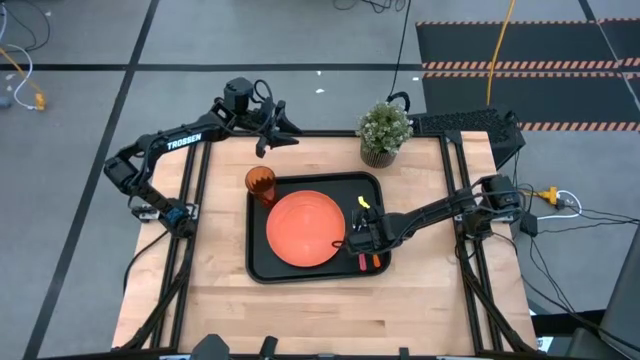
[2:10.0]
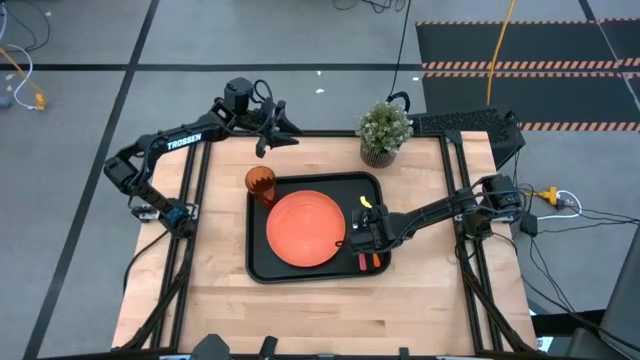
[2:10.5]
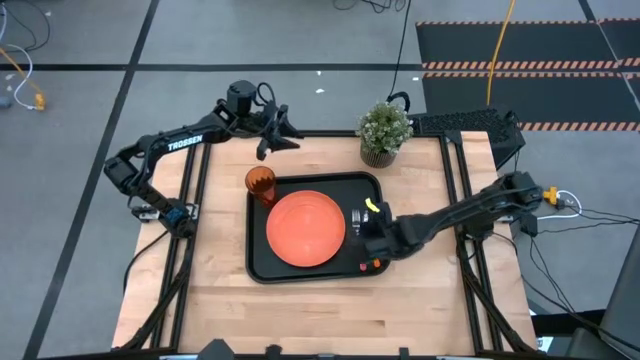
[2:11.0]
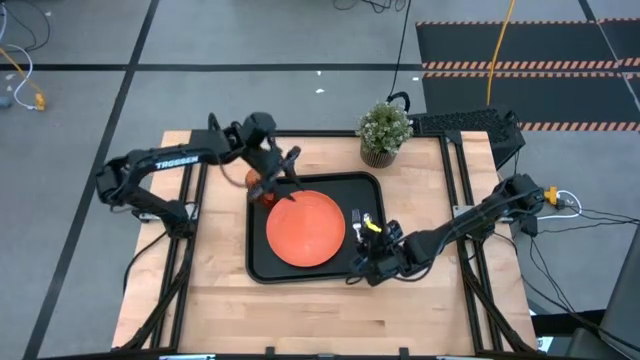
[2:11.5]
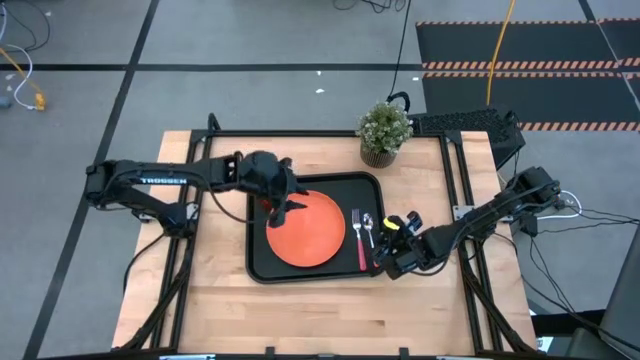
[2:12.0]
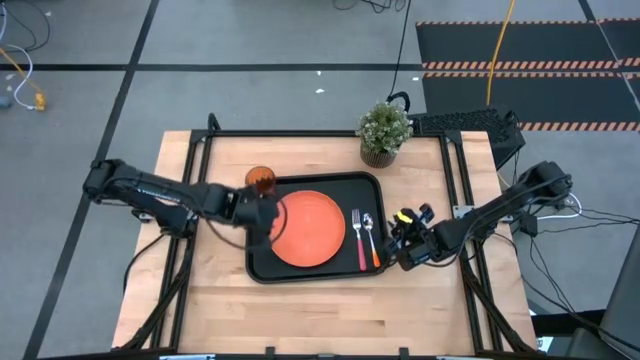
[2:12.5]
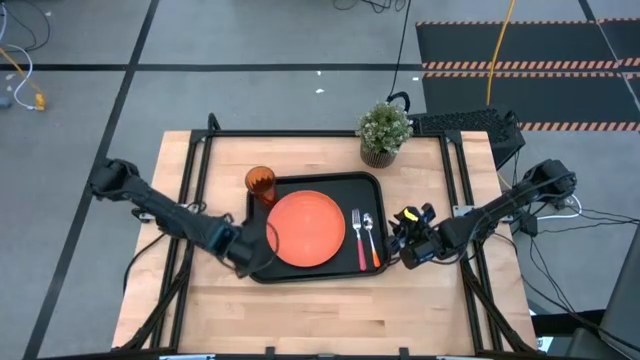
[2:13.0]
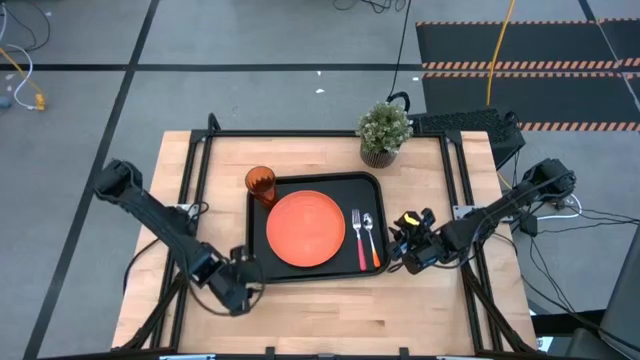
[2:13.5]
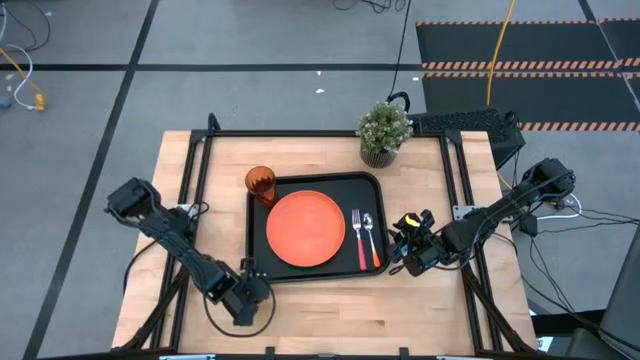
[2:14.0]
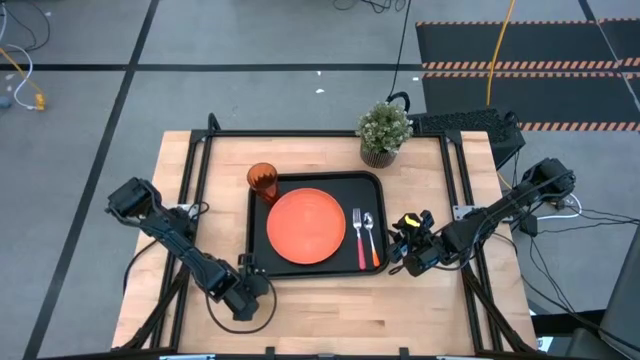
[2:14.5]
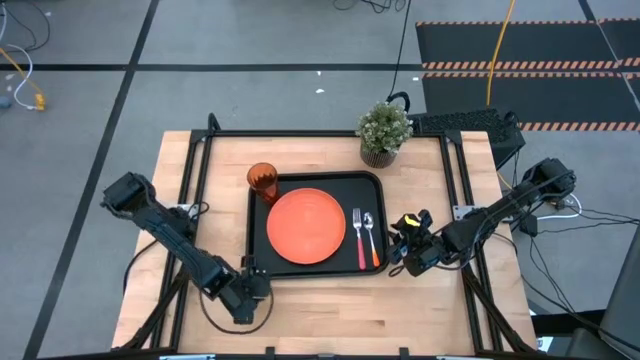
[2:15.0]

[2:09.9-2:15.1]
Task: Pick and place plate/cup/fork/spoon on tray
Adjust the black serving tray

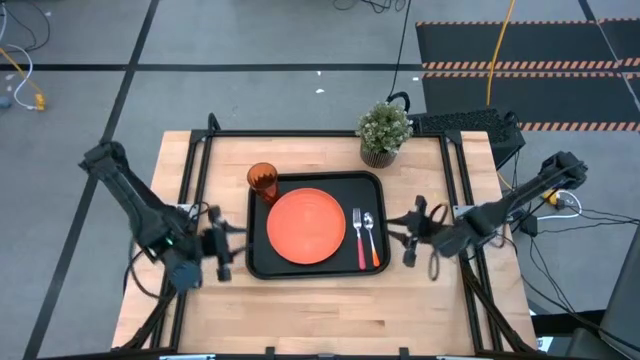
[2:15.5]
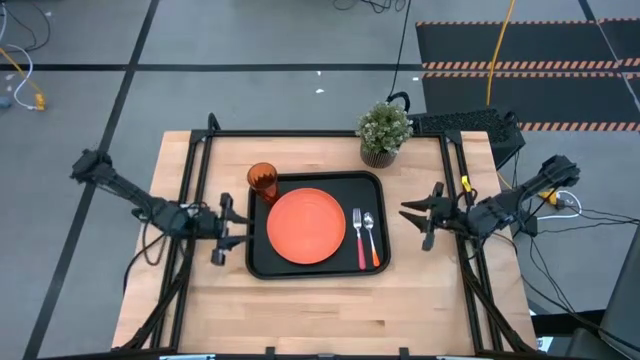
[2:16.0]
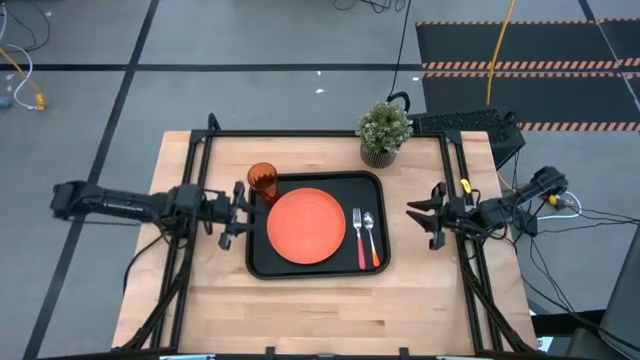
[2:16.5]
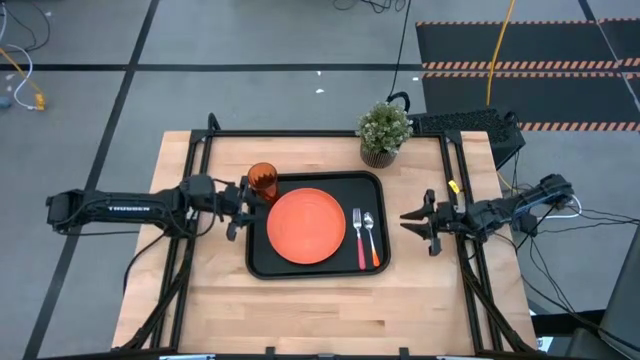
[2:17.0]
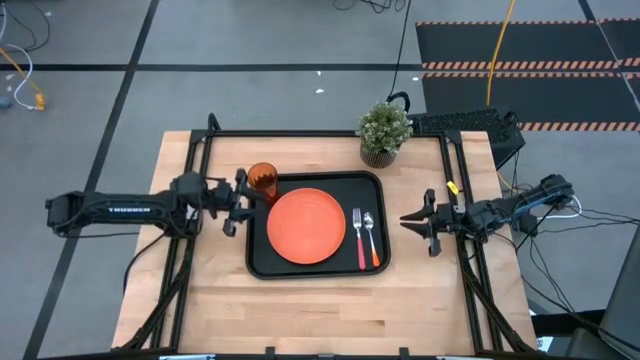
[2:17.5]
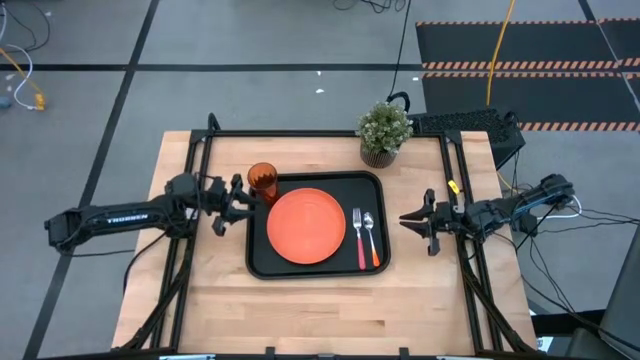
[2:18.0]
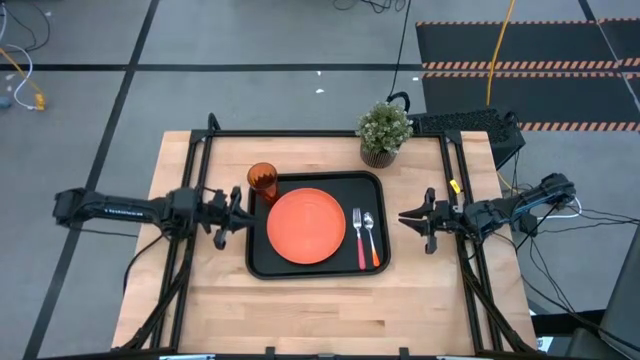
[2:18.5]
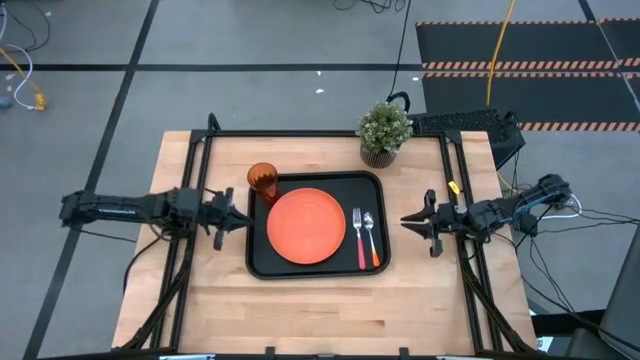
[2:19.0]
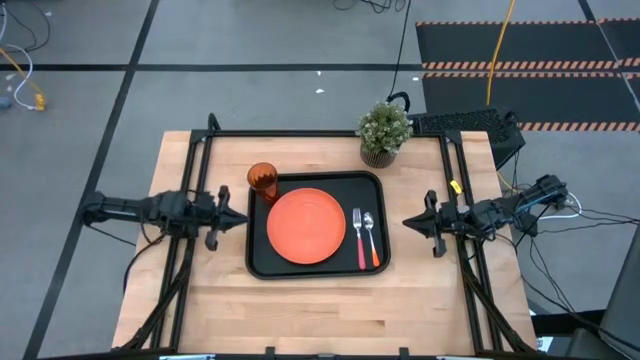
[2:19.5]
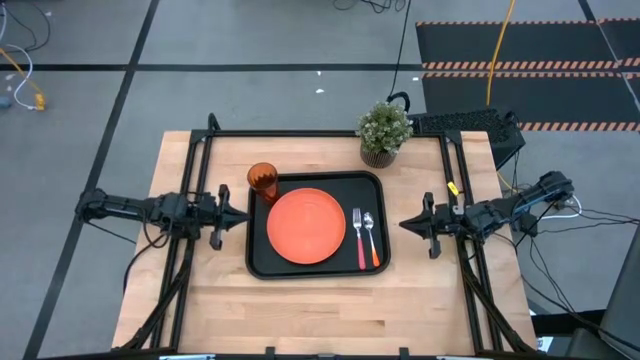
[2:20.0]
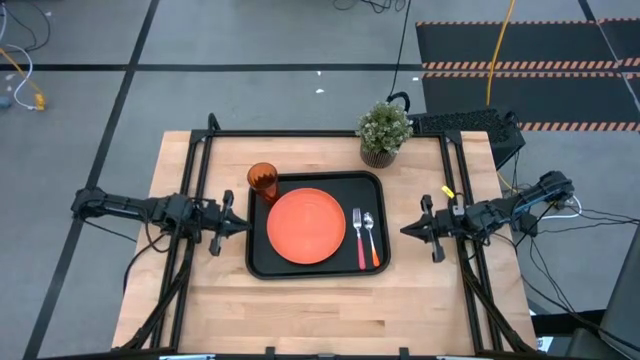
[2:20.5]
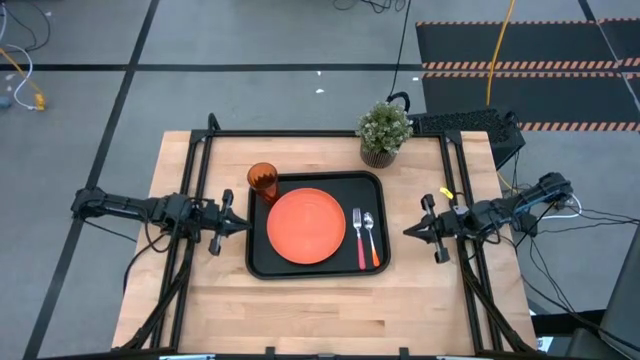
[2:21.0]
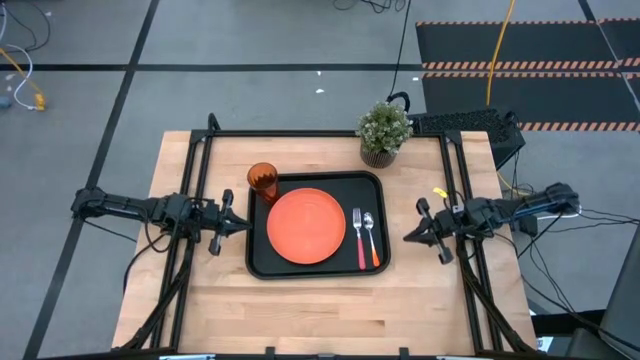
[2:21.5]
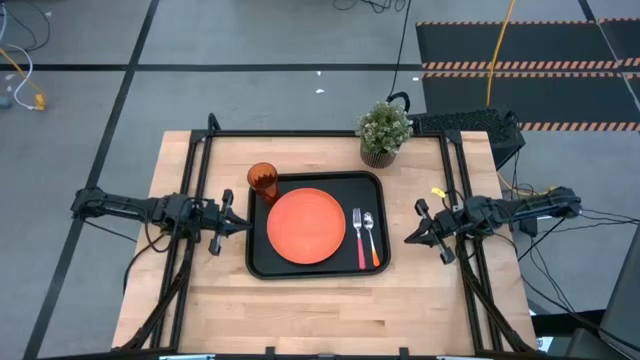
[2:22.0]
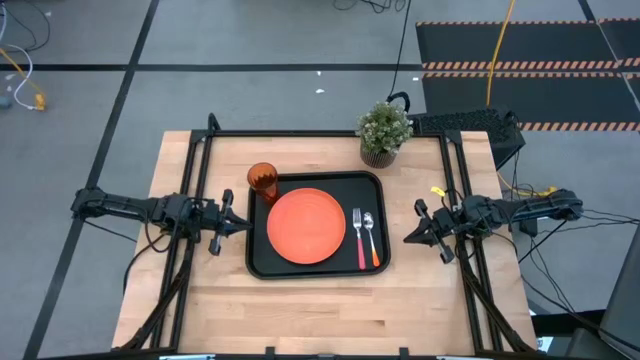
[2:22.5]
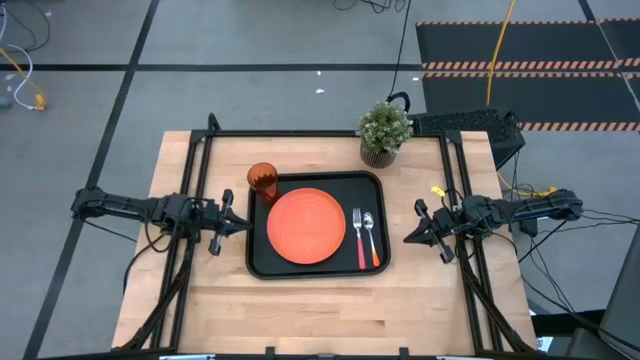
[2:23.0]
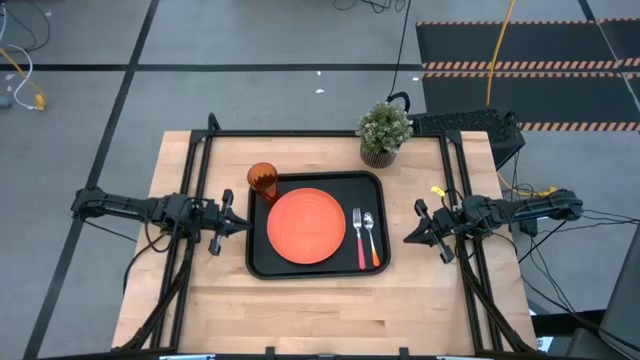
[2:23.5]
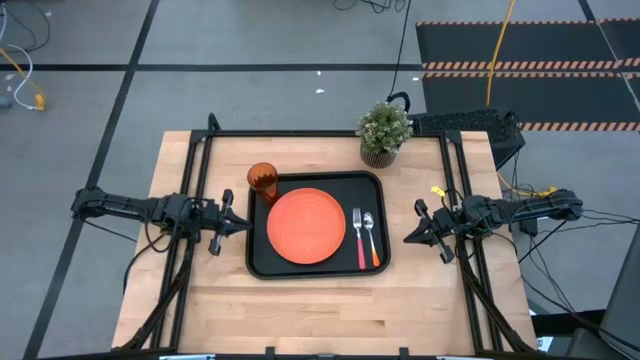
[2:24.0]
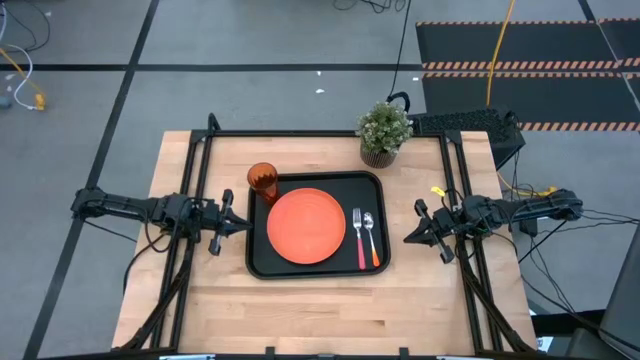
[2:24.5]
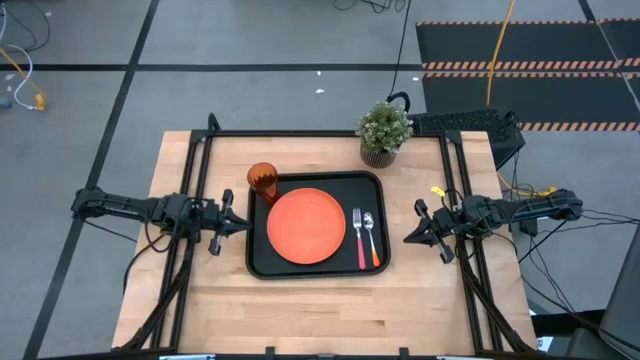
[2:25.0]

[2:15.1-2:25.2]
Return to Home Position

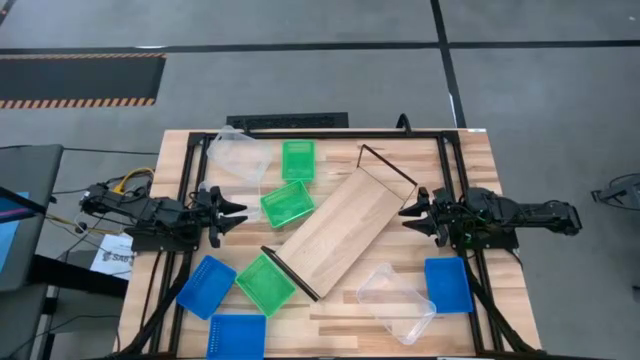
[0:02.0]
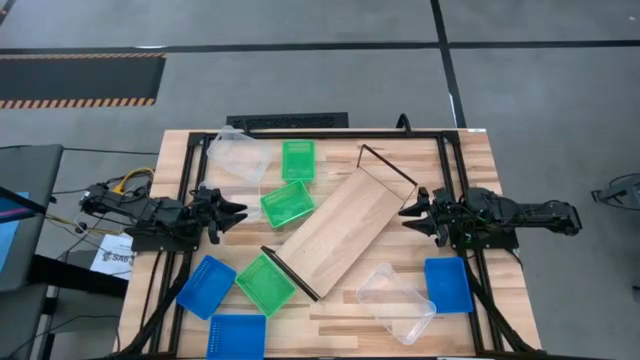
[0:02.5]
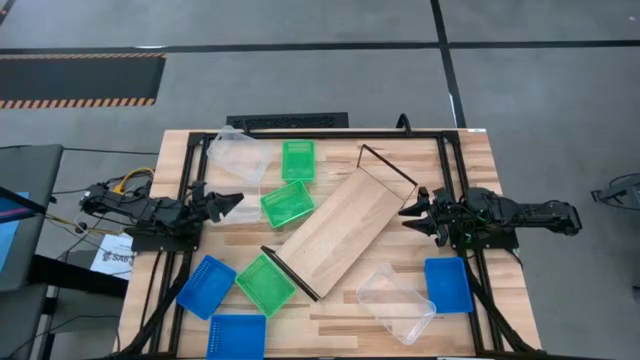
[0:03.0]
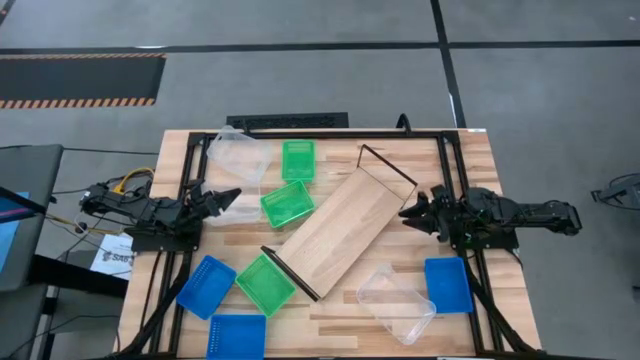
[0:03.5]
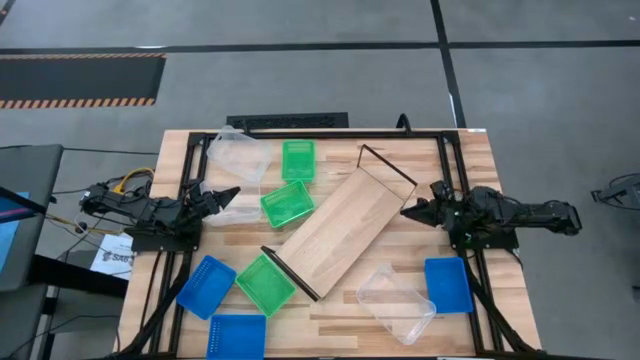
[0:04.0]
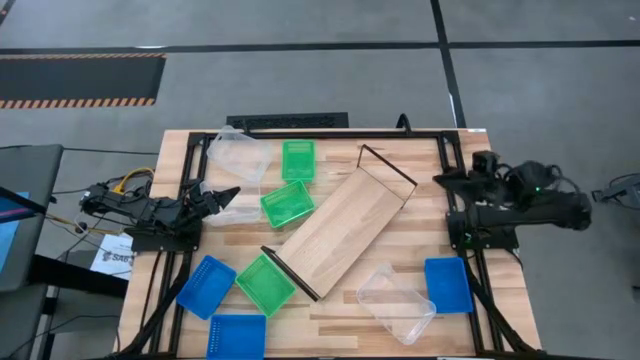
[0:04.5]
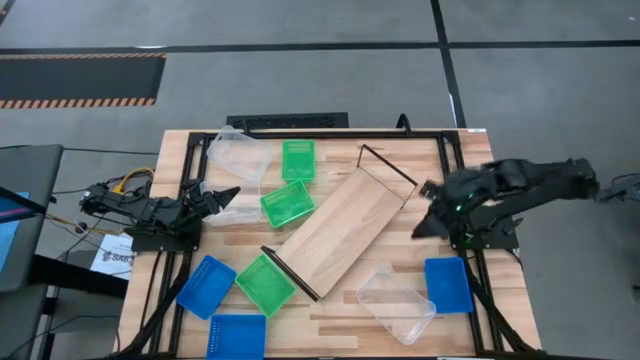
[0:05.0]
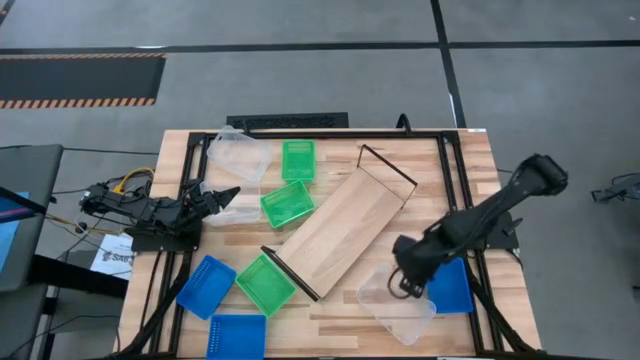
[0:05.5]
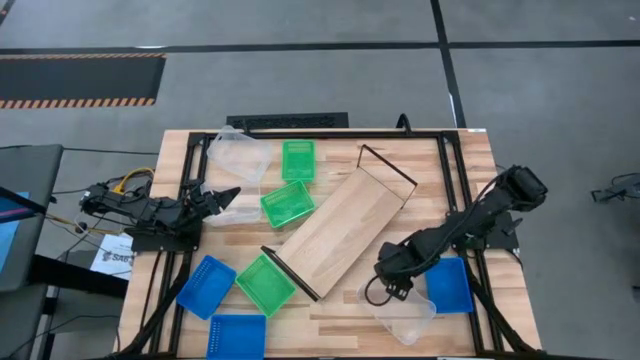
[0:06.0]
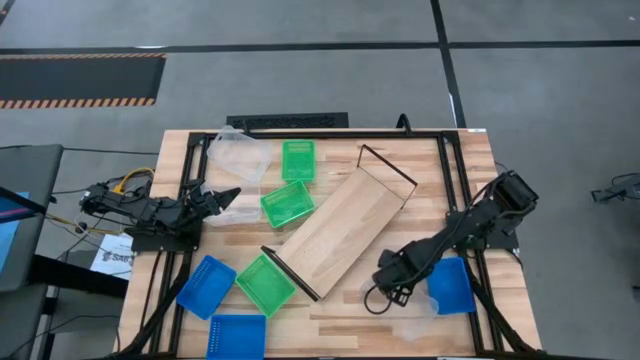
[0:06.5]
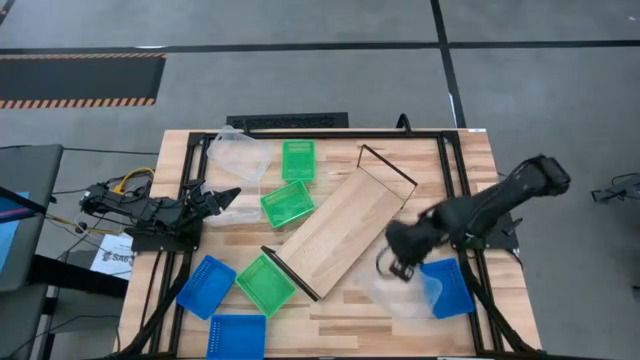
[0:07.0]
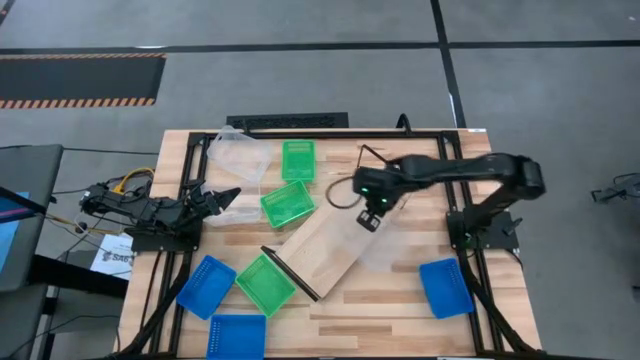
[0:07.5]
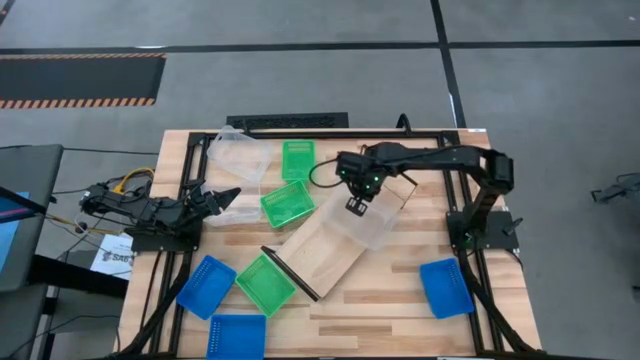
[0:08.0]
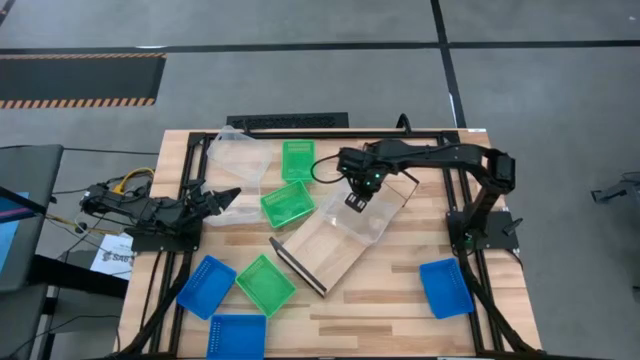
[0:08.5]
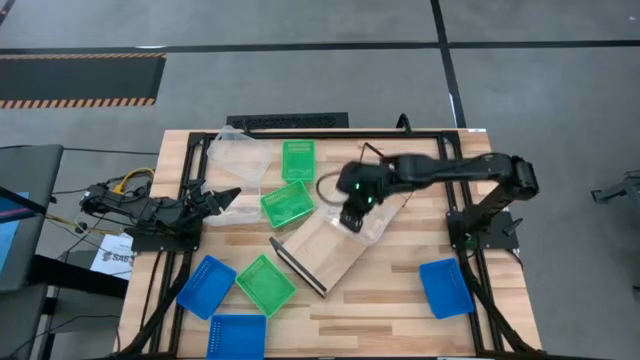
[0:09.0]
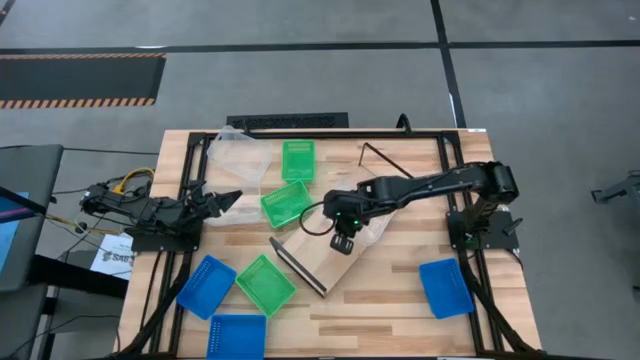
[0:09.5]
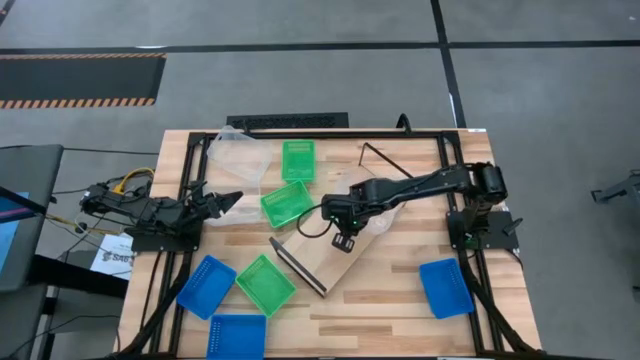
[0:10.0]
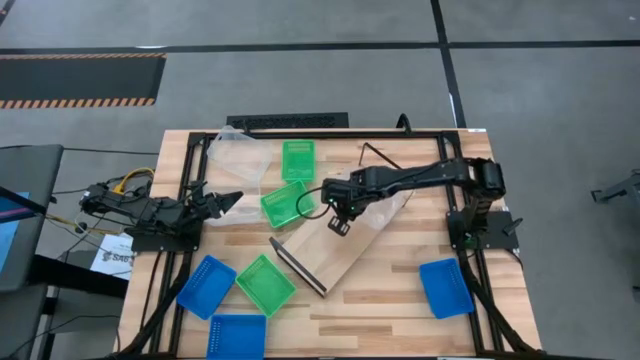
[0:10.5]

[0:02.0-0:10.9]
Task: Stack baskets on shelf by color
Put the bottom transparent bin on the shelf
